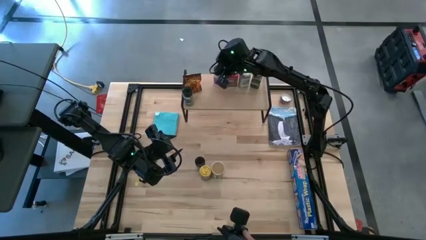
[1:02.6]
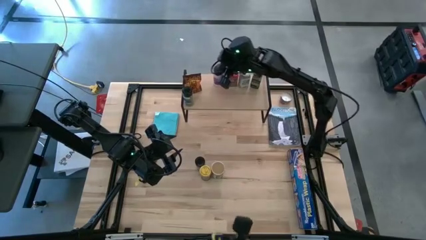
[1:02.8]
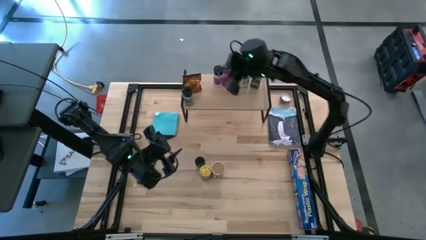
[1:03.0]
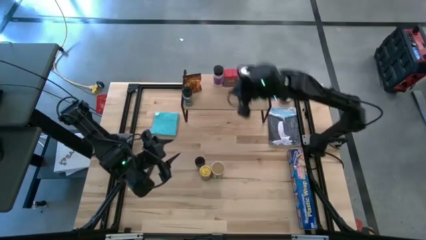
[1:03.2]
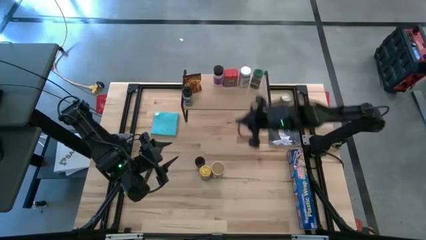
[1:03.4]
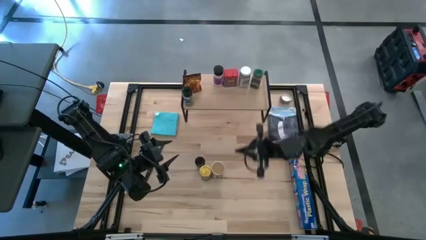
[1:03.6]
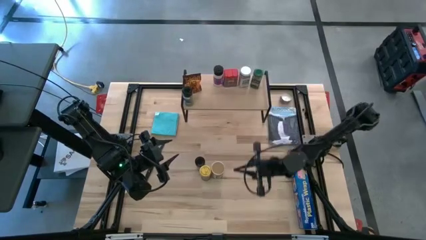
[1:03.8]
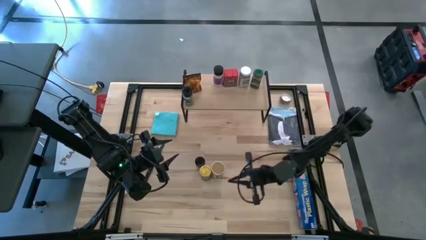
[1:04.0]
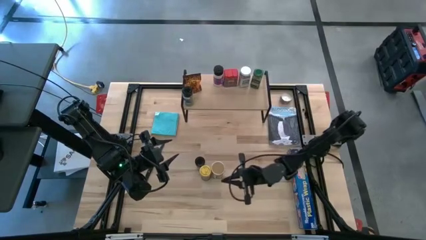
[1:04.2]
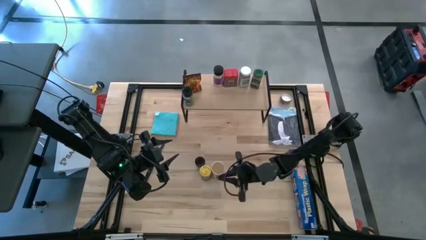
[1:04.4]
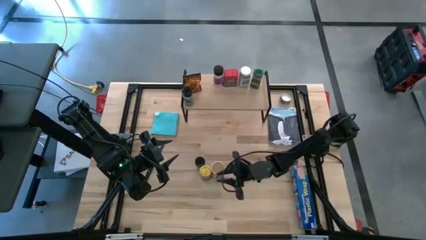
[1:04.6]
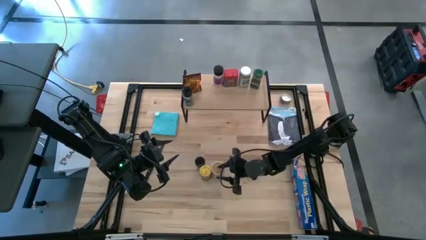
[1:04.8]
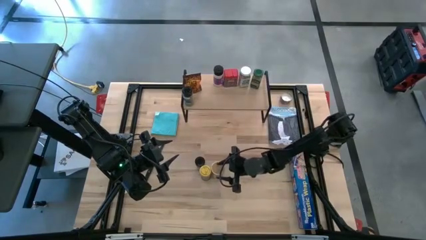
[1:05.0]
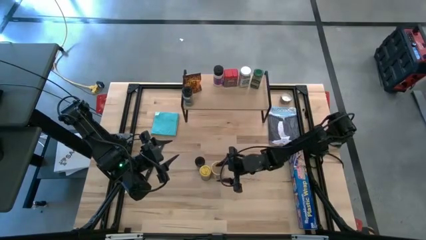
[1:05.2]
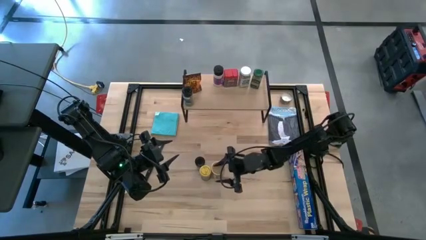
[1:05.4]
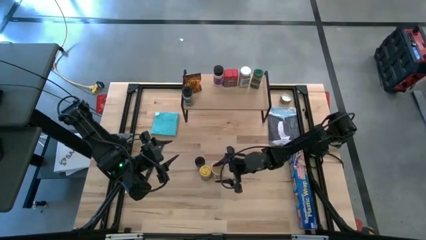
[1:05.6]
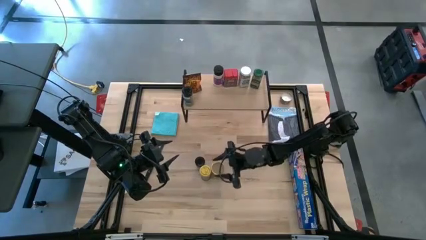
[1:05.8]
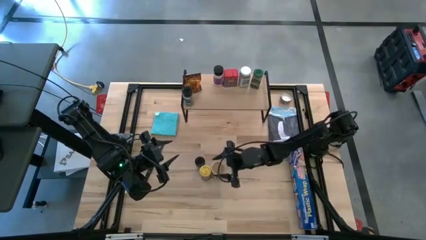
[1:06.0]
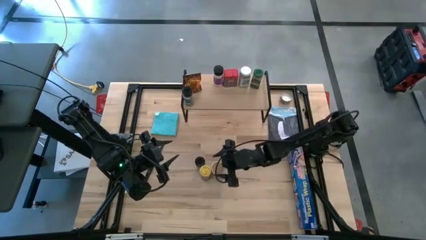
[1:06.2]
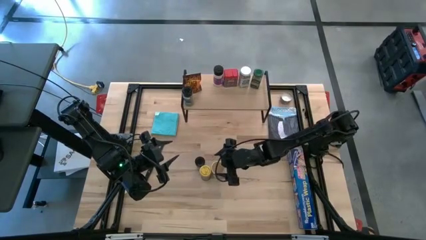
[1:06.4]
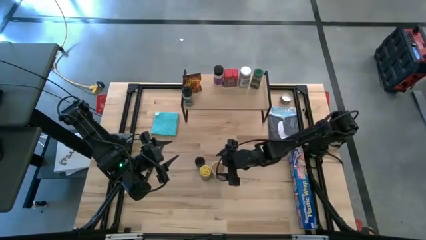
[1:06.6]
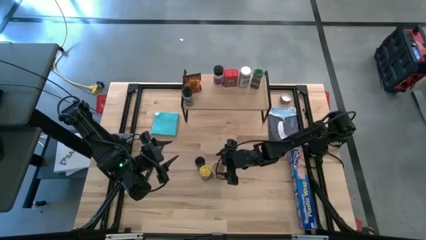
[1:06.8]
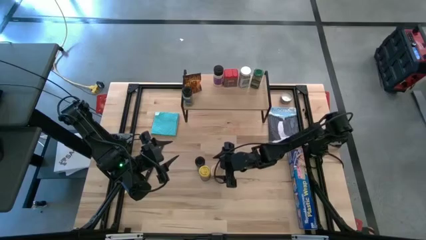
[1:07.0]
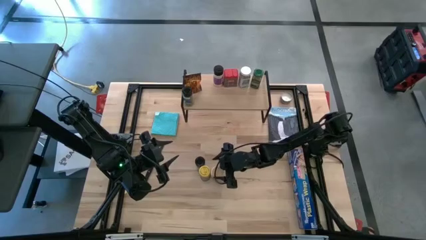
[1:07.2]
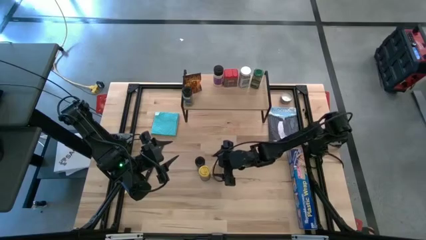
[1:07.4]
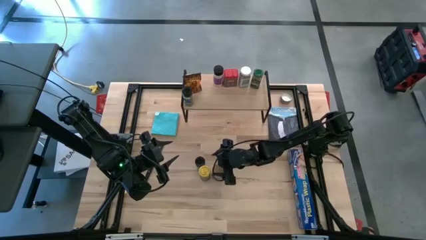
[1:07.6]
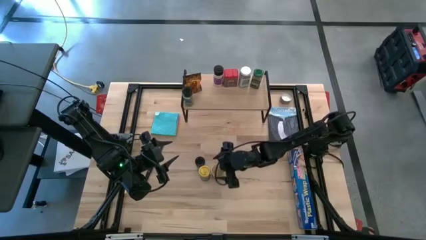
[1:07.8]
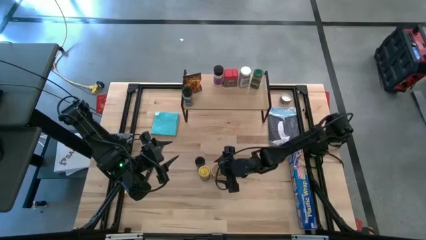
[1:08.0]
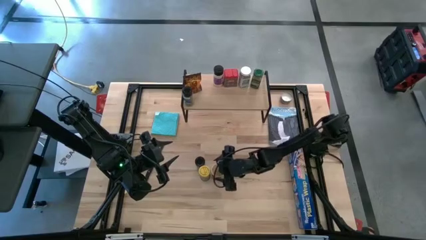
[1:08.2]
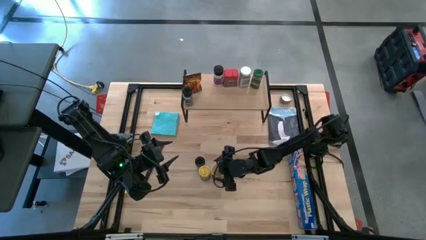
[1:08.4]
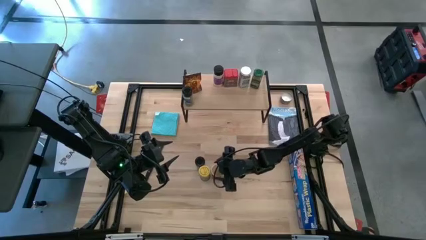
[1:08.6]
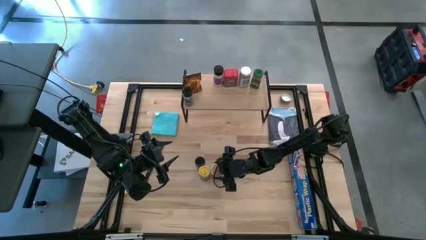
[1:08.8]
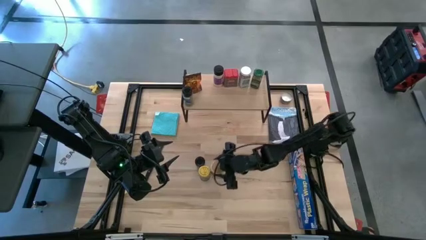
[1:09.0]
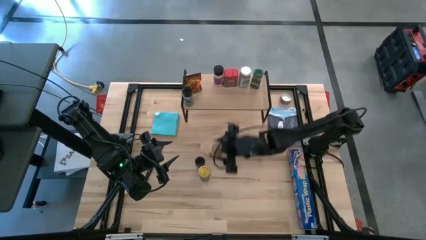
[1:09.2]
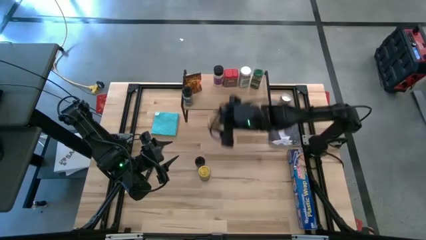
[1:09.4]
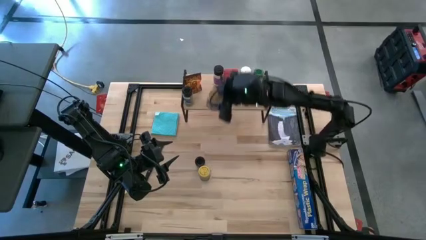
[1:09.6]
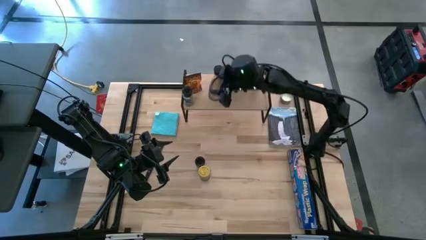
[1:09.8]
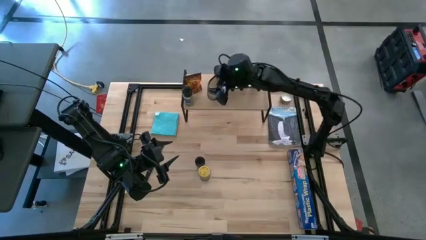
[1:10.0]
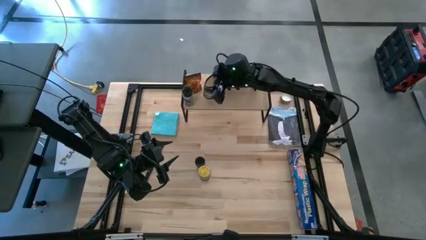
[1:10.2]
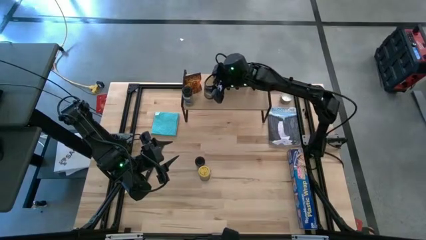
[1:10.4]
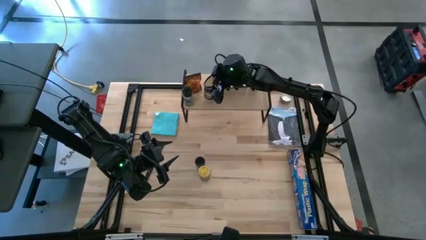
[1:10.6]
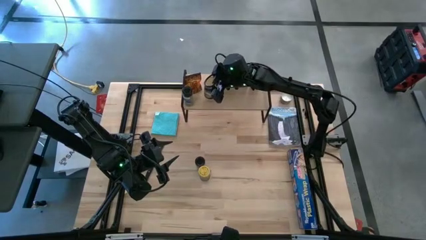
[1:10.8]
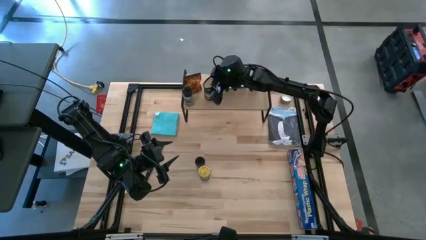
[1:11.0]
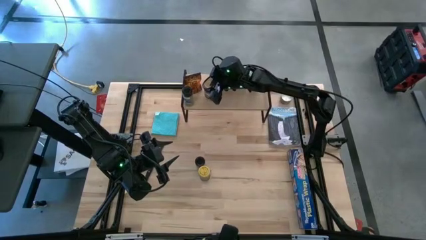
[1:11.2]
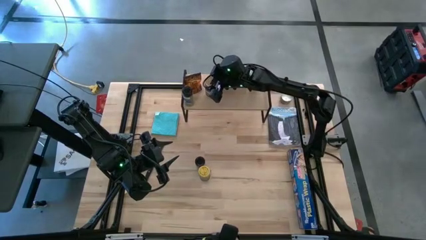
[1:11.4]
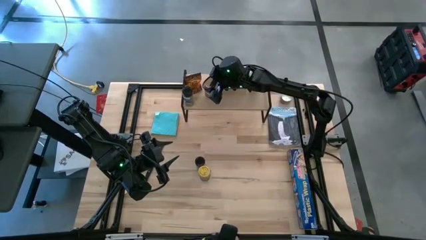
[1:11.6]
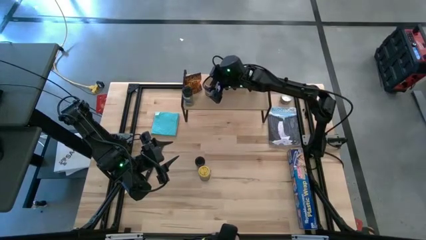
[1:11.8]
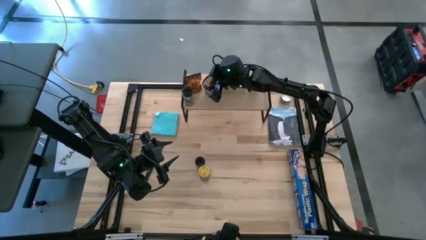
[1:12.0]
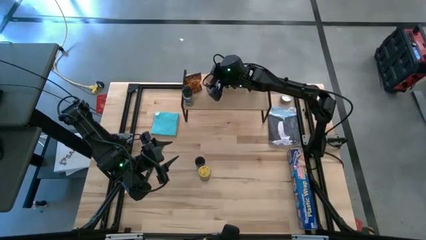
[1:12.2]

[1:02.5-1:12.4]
Task: Shelf spices
Put the golden seasoning bottle under the shelf

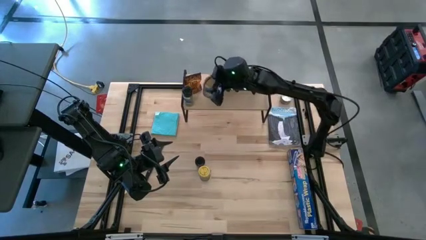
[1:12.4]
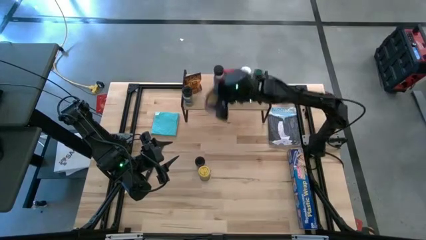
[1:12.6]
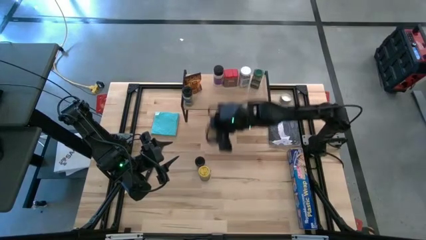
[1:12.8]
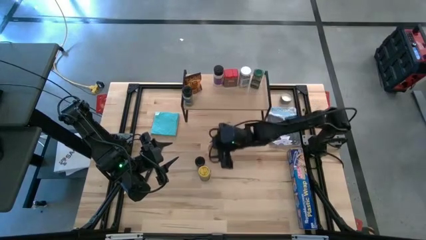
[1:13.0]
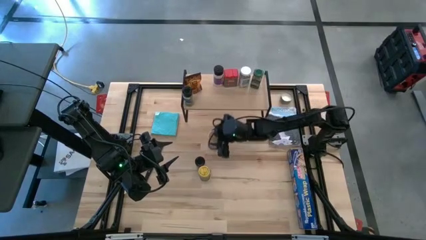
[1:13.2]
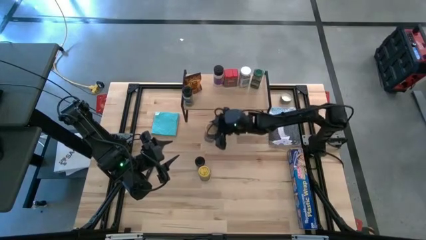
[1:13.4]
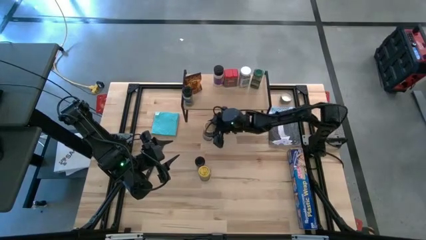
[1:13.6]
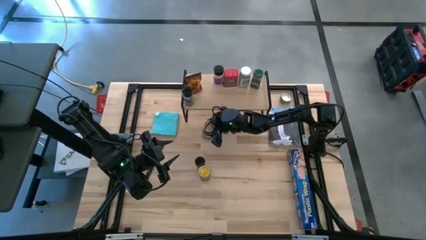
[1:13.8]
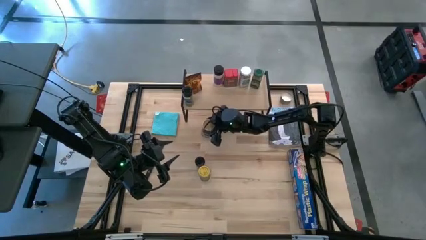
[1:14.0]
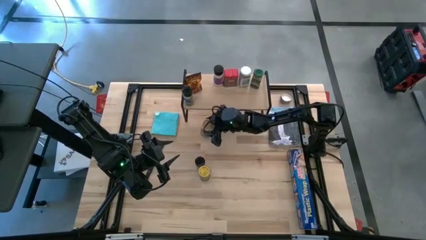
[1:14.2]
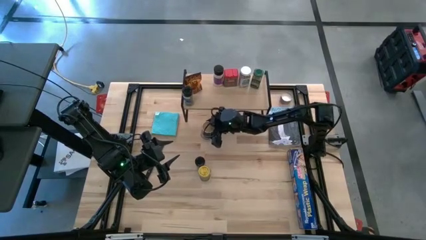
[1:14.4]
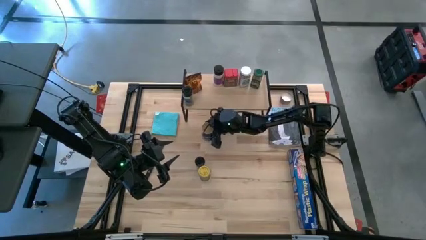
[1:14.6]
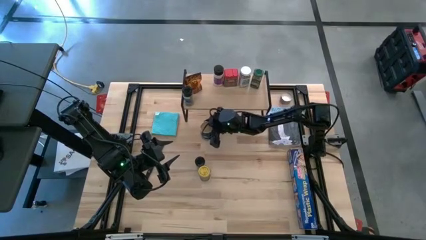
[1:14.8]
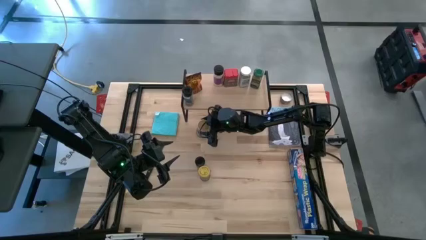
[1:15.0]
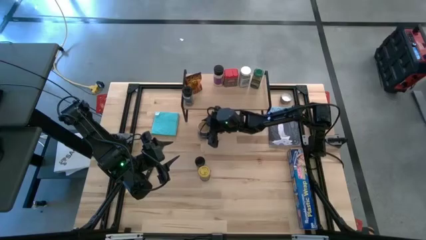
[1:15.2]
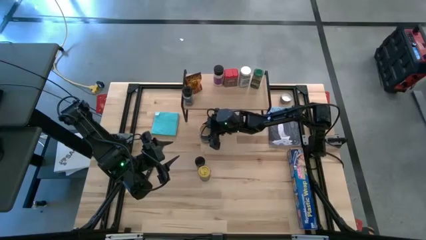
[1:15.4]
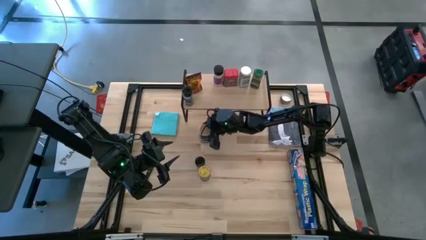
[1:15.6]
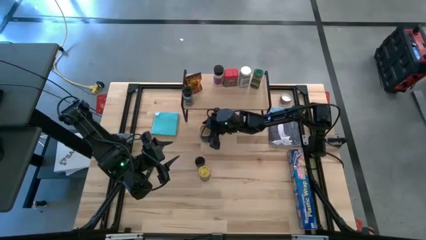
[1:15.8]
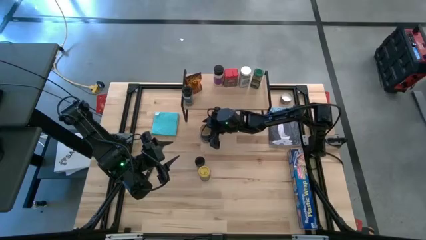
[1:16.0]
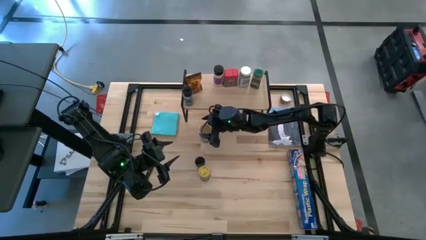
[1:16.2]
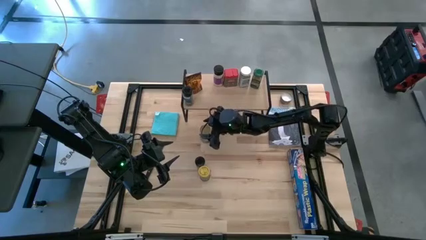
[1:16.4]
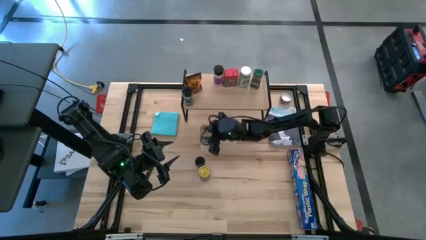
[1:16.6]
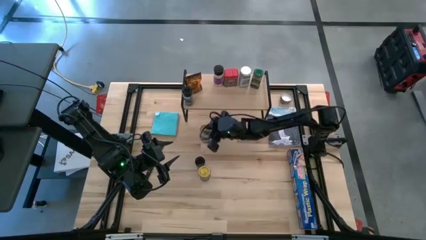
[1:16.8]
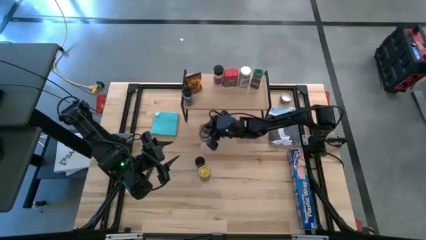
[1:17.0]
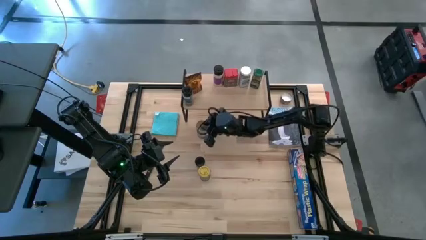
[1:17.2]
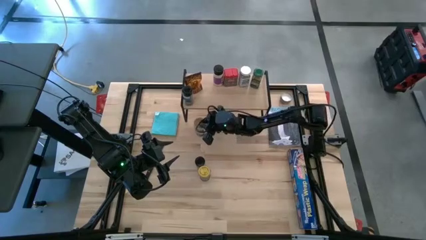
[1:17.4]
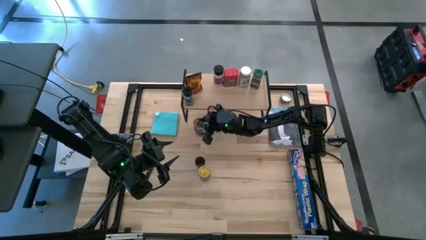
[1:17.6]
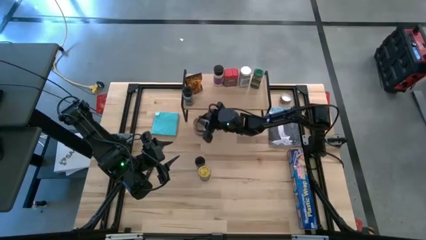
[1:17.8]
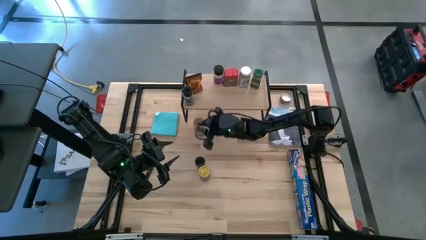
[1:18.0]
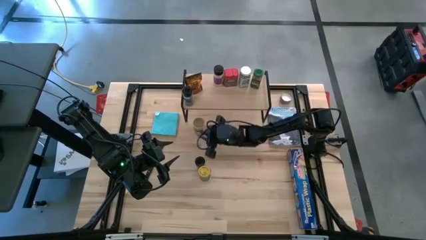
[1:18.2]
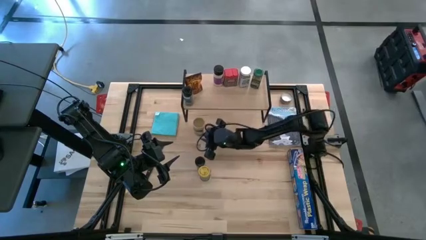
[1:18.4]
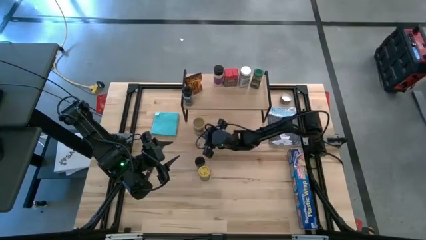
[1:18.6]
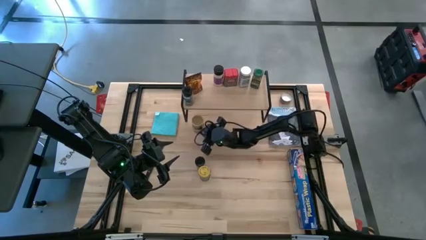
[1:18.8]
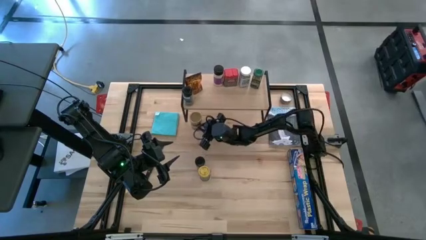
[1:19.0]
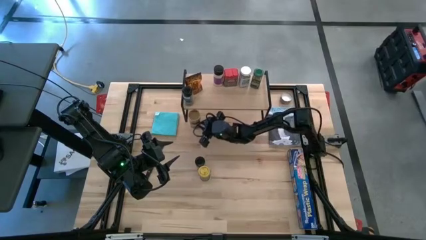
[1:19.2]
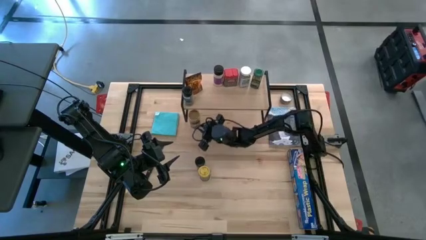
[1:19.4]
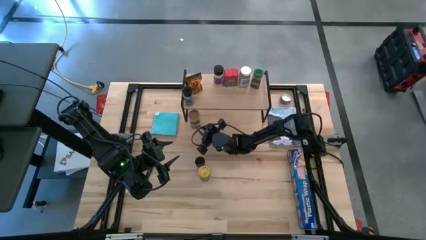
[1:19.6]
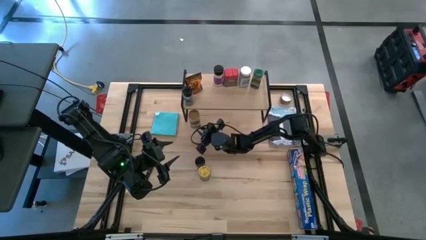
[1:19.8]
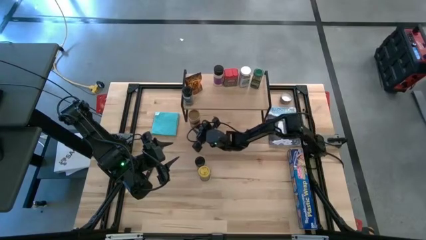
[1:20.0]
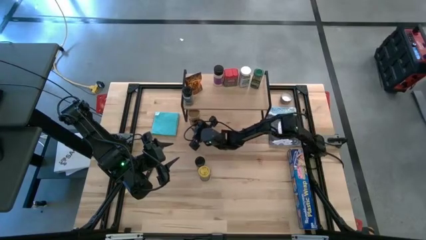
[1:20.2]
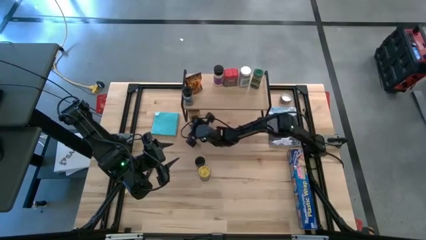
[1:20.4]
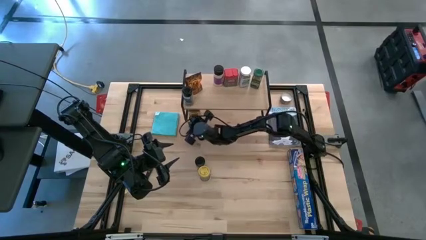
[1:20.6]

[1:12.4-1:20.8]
Put the golden seasoning bottle under the shelf
